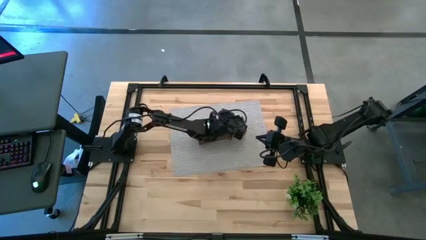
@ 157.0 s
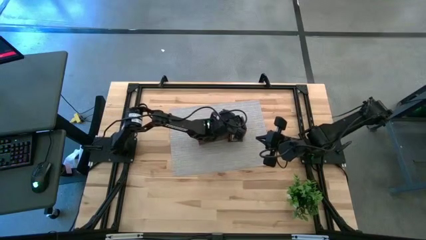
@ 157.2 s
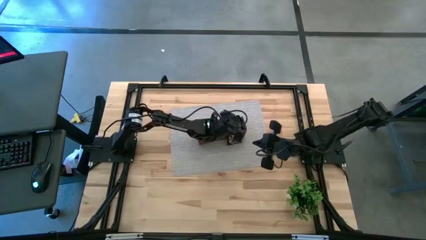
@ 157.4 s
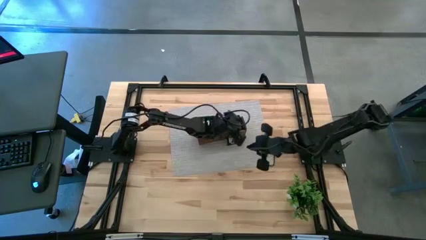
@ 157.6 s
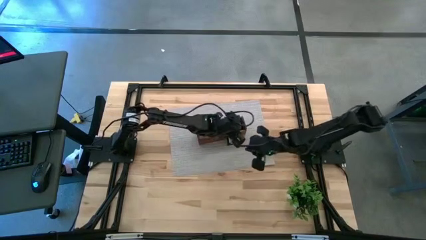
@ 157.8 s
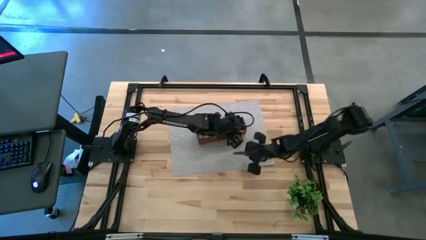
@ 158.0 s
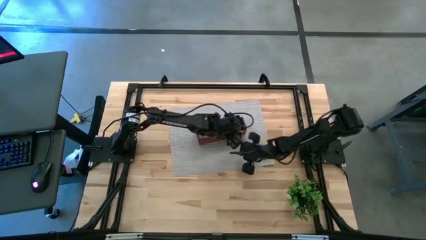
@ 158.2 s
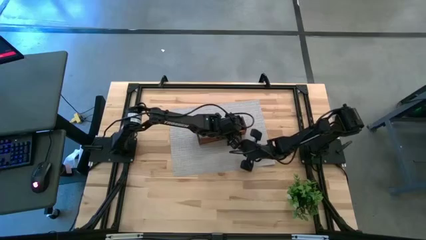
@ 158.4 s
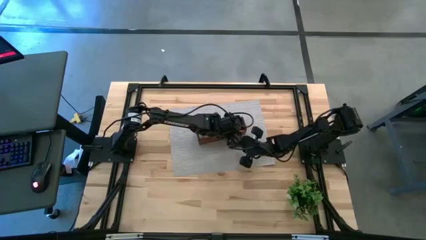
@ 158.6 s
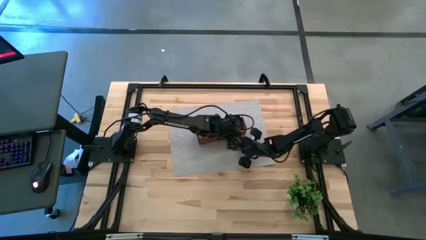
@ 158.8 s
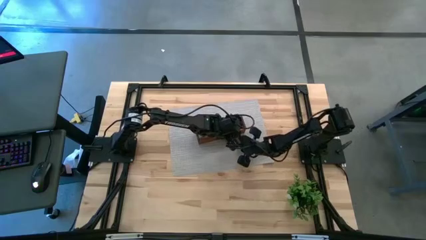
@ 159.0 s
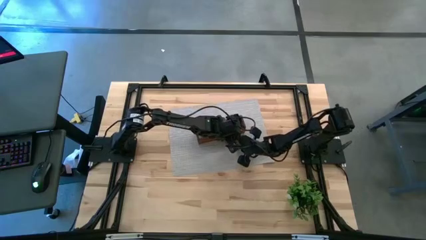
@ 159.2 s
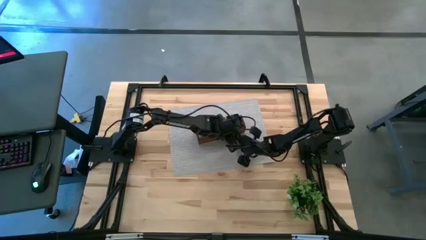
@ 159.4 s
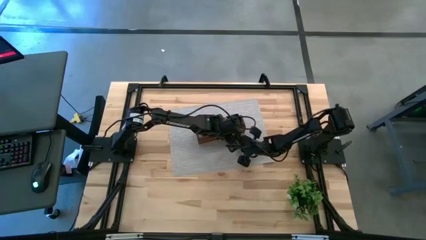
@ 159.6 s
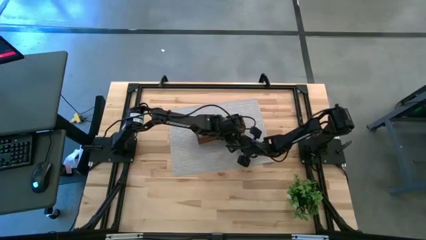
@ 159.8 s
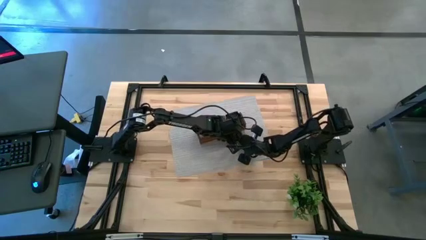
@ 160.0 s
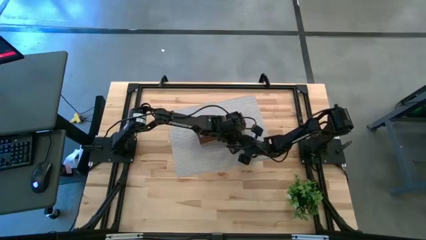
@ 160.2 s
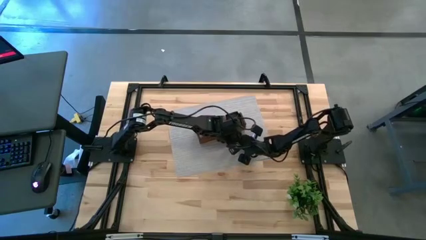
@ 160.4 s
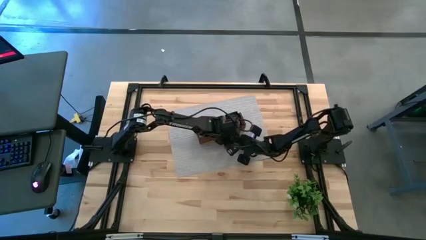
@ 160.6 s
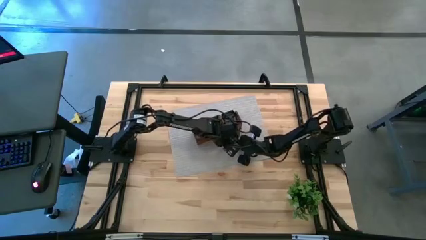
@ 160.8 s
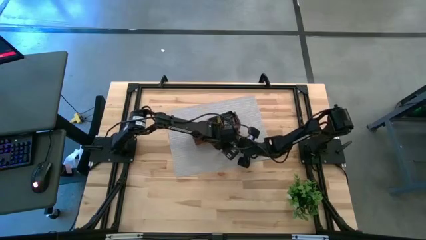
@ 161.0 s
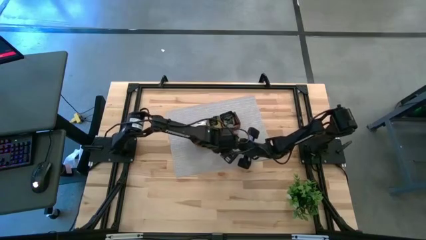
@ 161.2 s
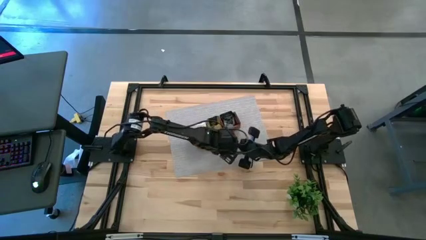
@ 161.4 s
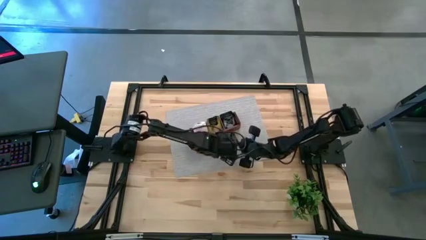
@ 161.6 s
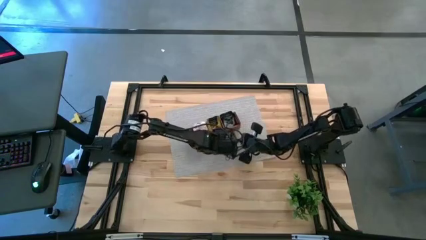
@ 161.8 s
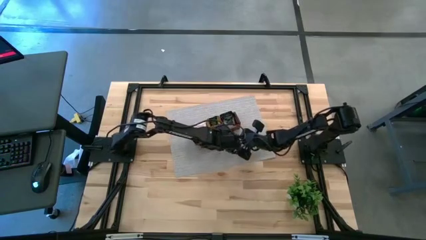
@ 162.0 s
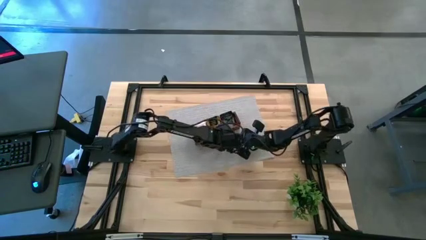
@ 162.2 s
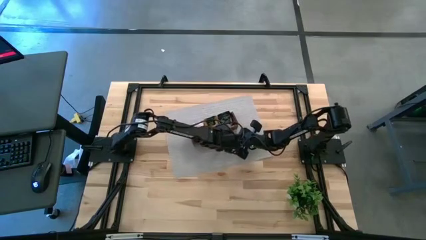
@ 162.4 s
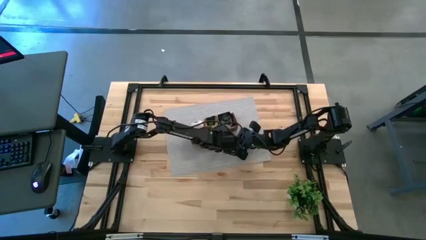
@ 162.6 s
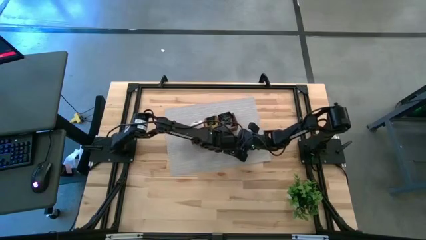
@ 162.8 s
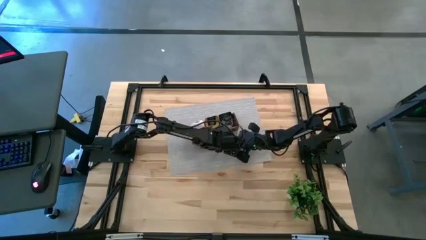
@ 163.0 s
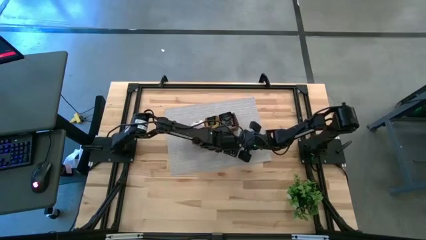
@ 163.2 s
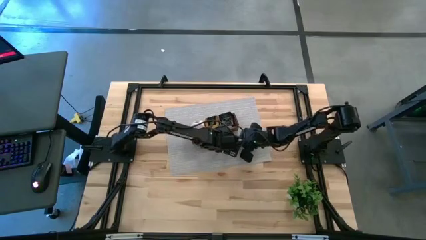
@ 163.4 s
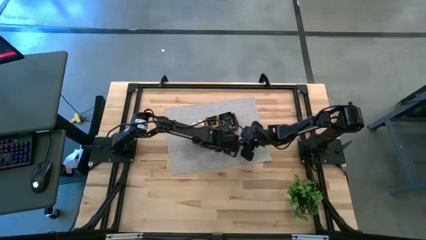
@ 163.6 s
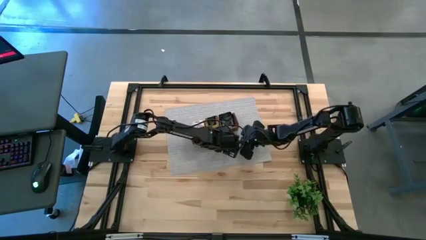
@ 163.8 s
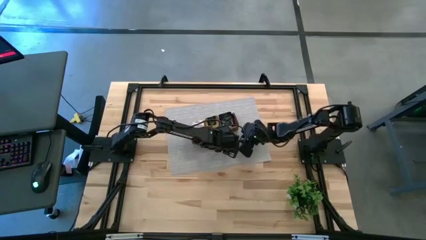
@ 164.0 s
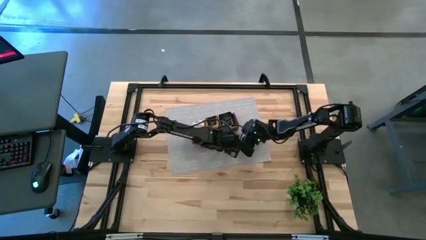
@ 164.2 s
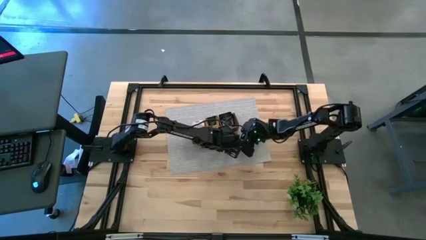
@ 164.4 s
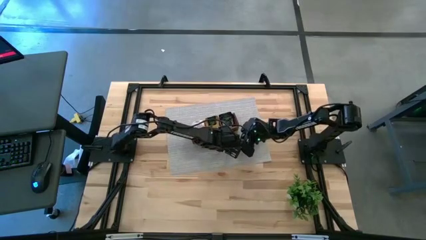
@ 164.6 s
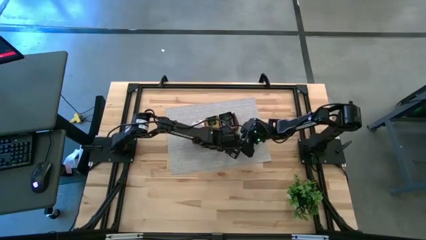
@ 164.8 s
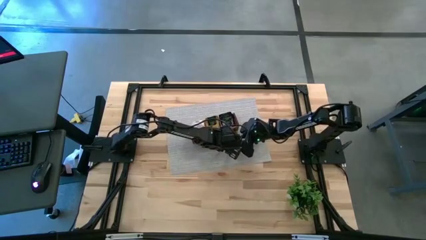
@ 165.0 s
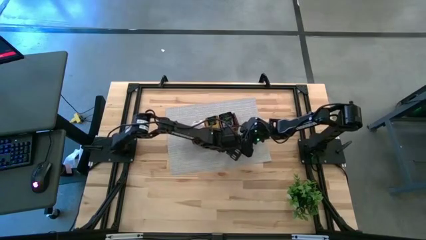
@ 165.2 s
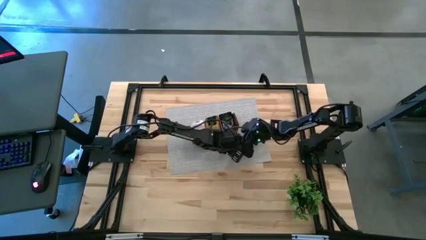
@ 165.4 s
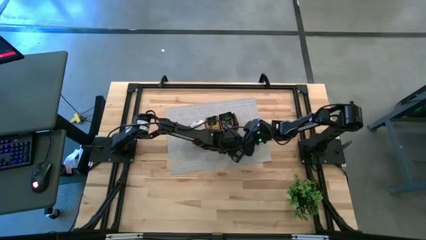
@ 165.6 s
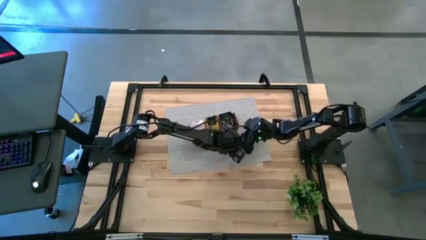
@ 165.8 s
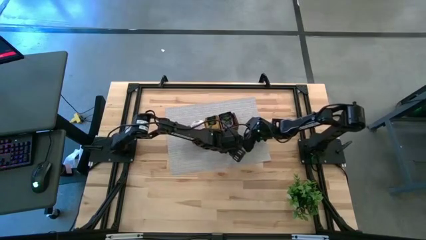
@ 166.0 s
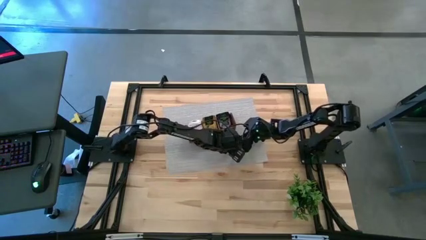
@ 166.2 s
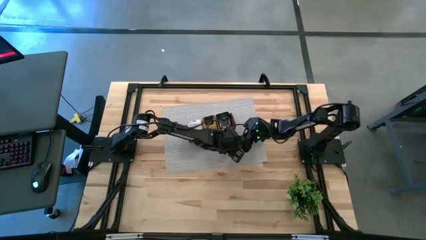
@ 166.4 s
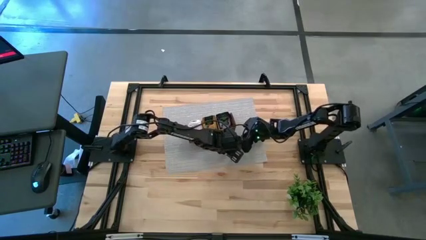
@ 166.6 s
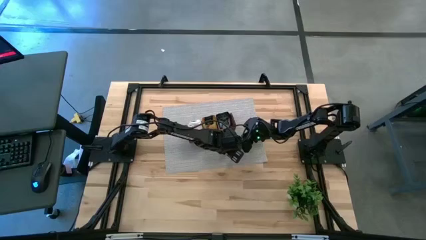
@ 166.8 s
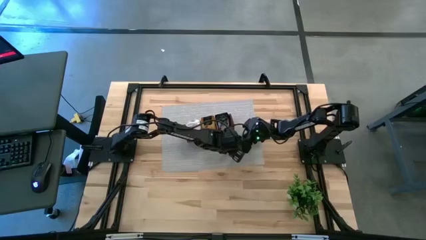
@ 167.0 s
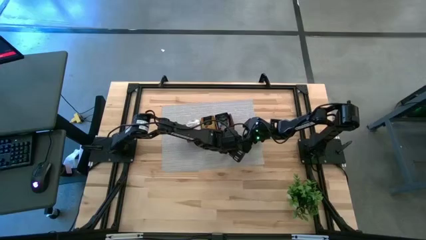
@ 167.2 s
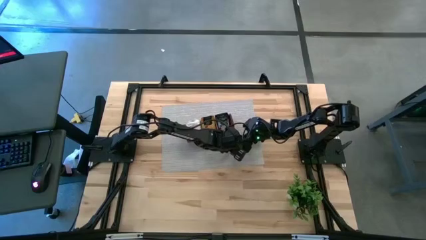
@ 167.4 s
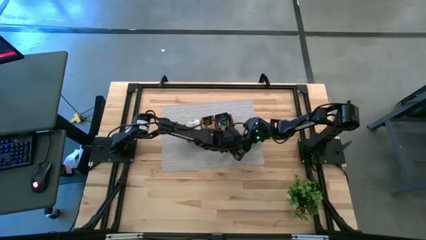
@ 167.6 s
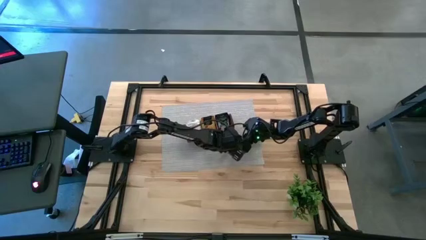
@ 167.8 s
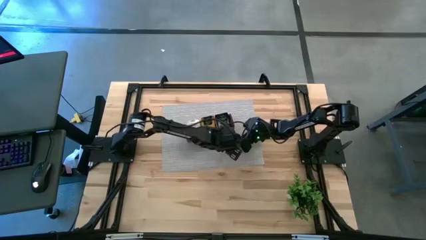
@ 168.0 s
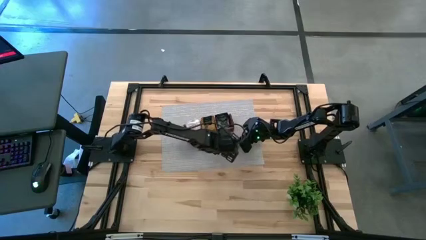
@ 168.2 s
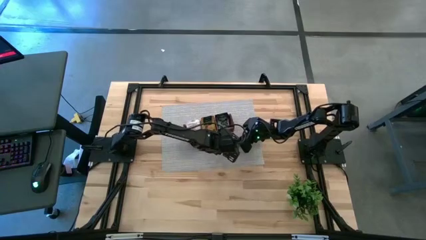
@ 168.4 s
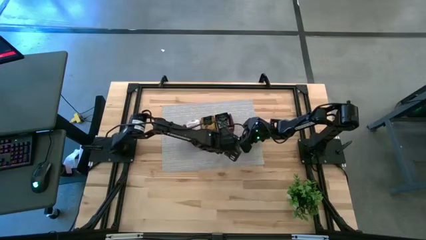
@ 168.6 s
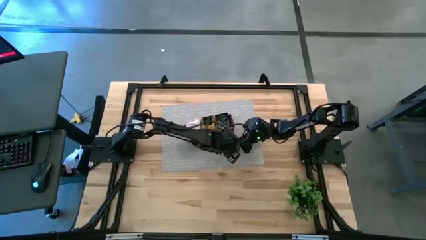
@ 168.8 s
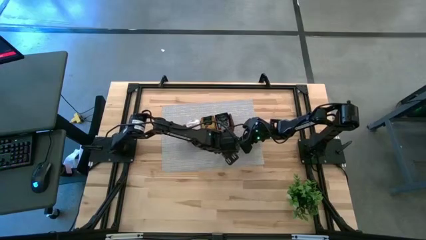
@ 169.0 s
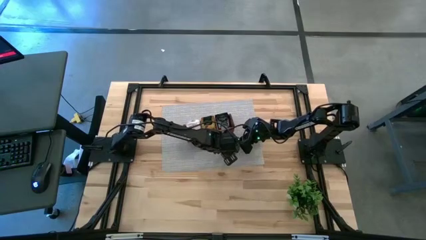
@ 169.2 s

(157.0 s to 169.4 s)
Task: Pick & Place Tea
Put the violet tea bag into the right section of the wooden organizer

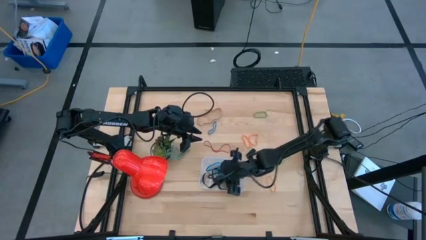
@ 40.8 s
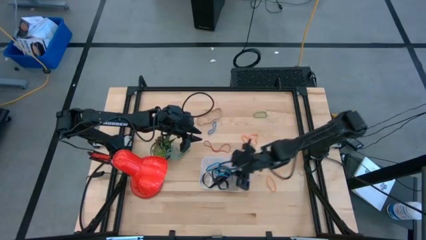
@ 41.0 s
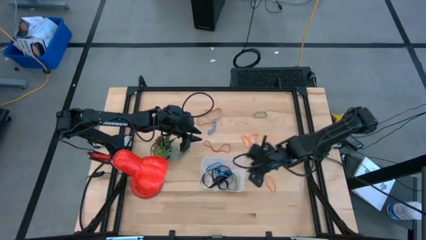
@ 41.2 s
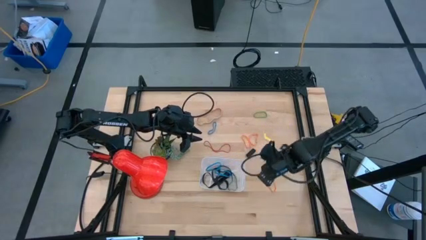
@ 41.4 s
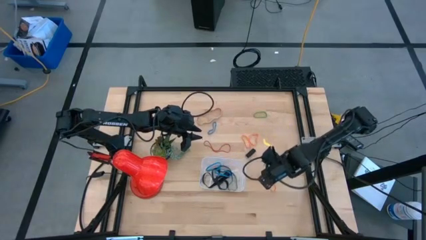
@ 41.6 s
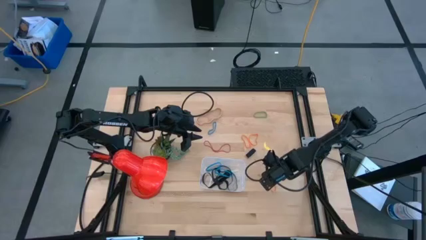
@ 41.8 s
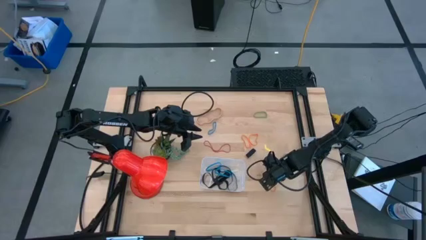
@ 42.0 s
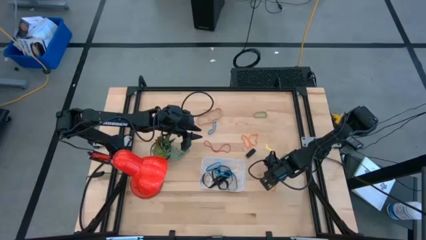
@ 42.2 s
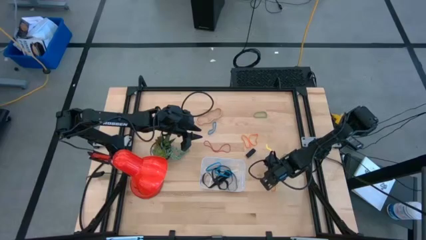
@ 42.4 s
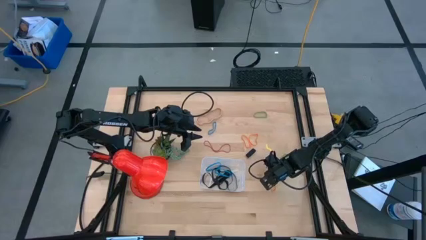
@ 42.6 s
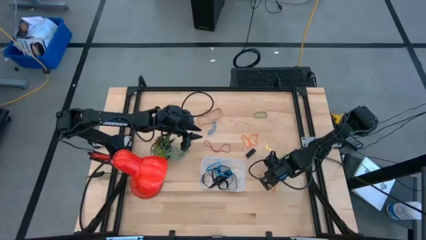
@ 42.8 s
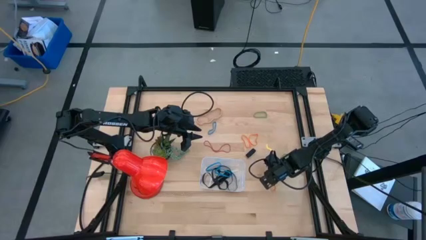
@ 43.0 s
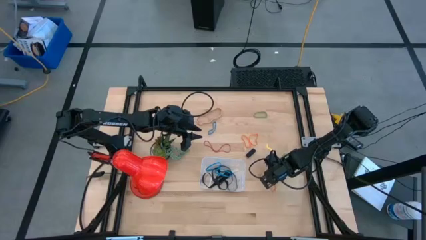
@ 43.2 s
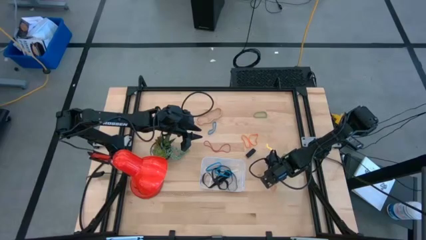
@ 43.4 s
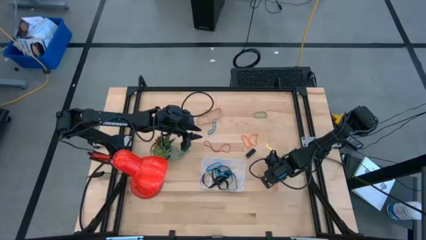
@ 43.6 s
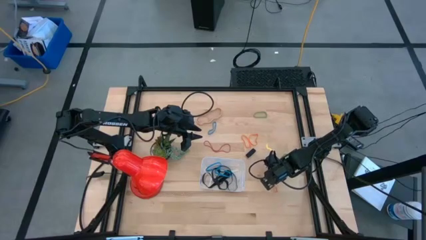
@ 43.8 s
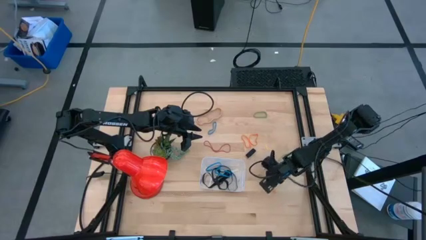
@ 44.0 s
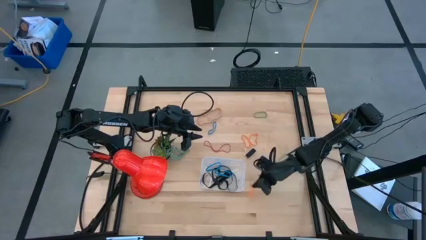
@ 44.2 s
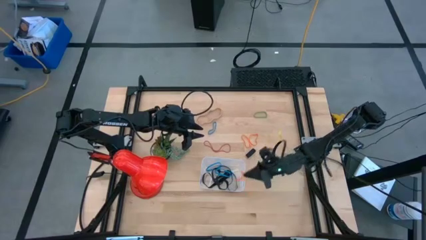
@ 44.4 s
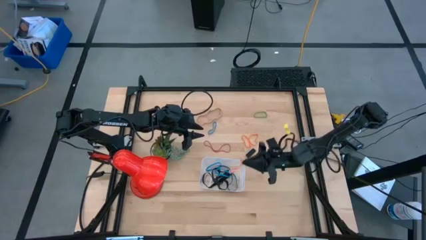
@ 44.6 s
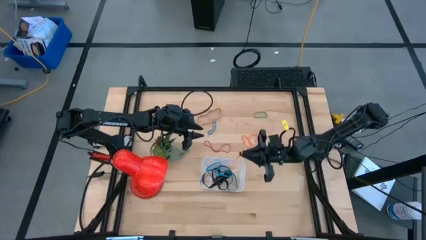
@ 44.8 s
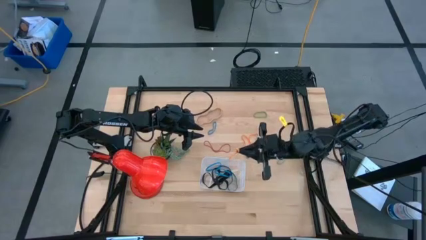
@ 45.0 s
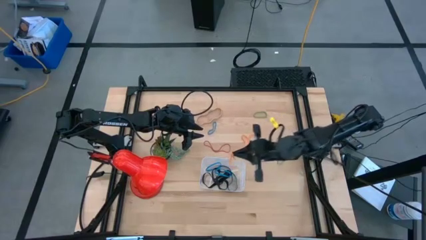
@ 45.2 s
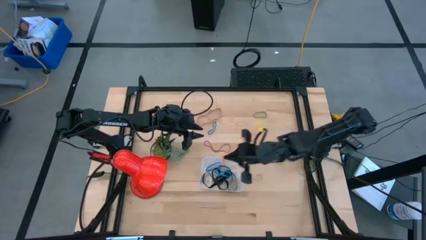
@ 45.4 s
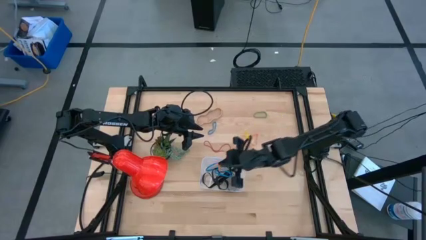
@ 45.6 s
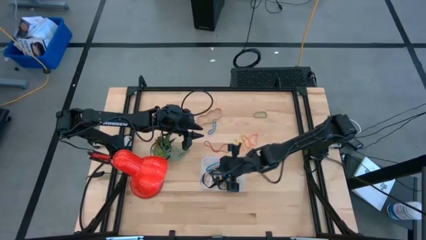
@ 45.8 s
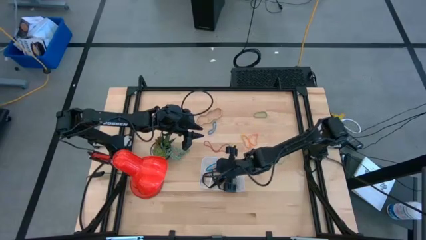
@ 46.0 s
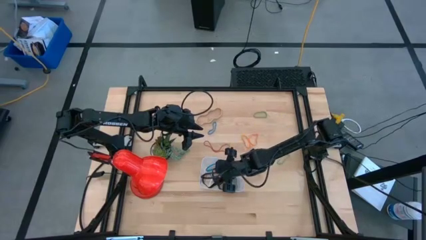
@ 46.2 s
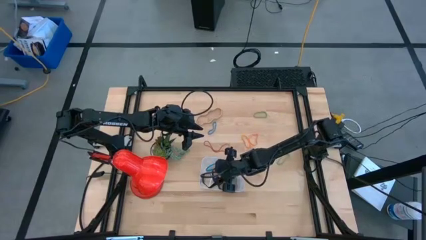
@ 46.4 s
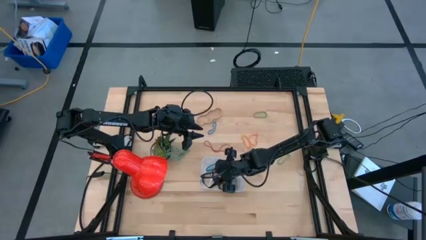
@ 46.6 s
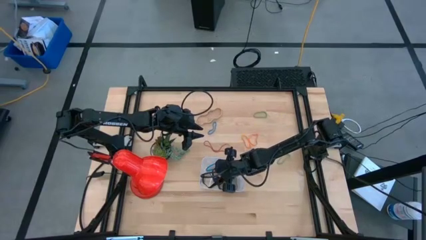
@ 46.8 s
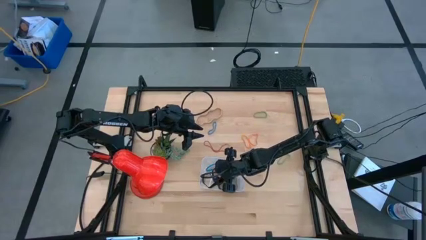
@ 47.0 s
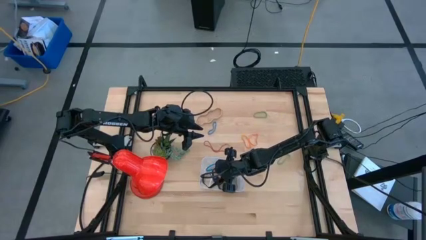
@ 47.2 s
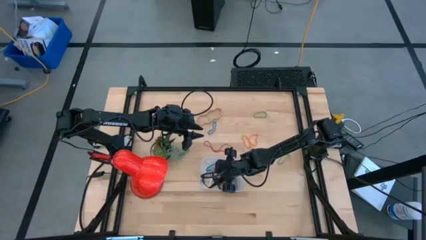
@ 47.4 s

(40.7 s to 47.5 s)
Task: Pick and place rubber bands into bin
Put the bottom orange rubber band into the bin
